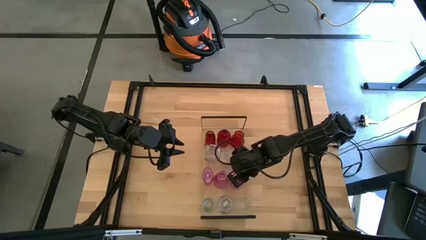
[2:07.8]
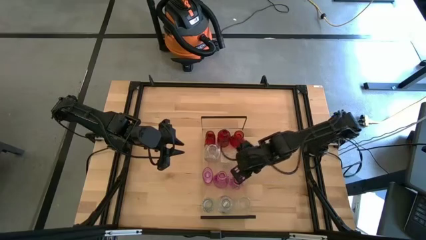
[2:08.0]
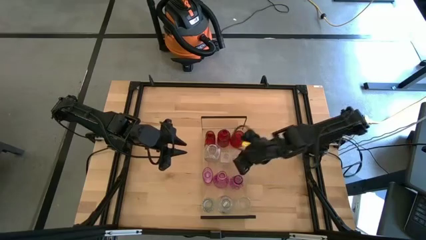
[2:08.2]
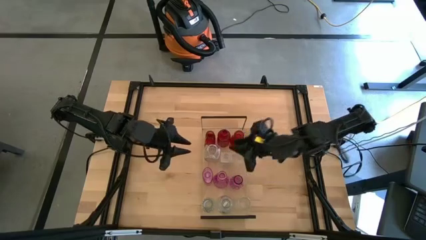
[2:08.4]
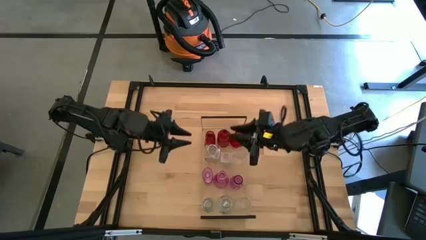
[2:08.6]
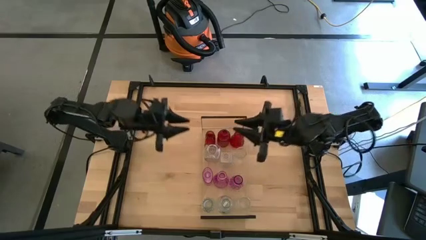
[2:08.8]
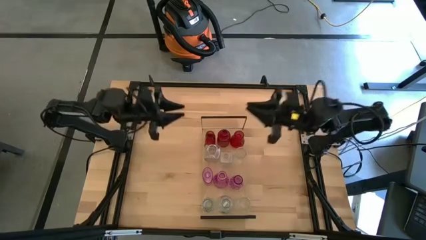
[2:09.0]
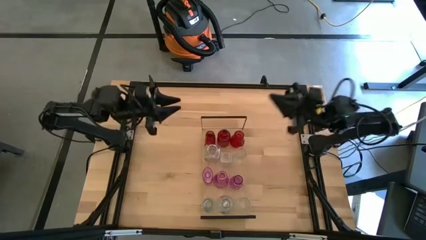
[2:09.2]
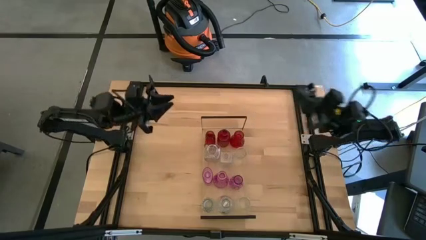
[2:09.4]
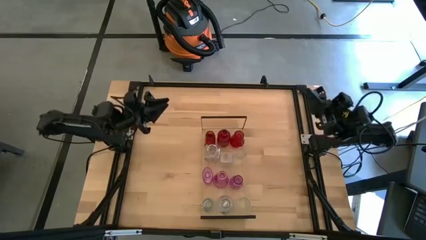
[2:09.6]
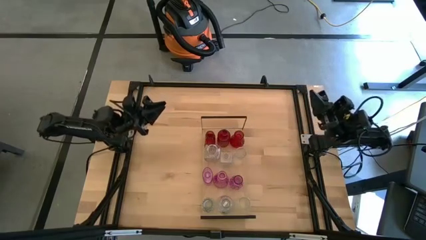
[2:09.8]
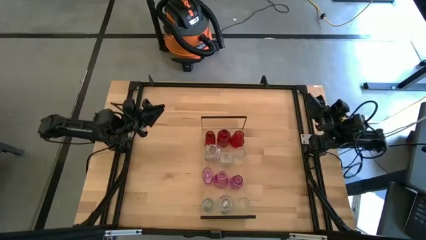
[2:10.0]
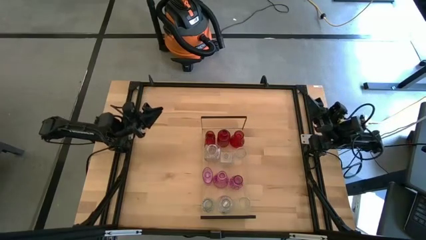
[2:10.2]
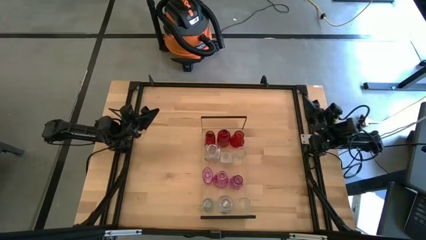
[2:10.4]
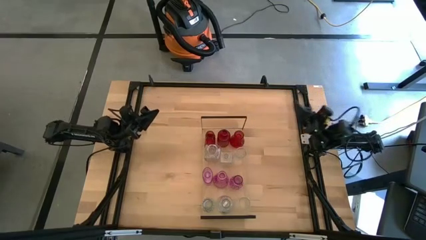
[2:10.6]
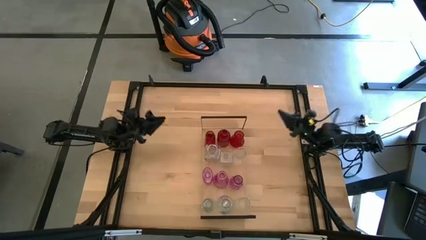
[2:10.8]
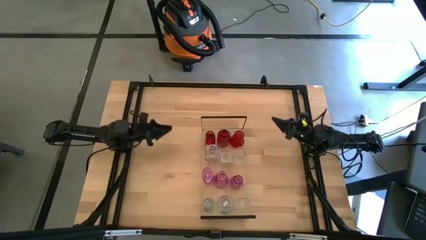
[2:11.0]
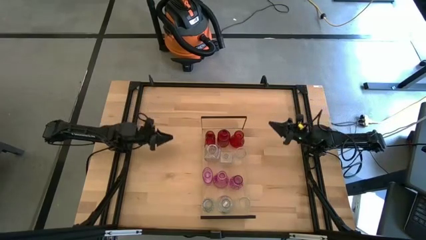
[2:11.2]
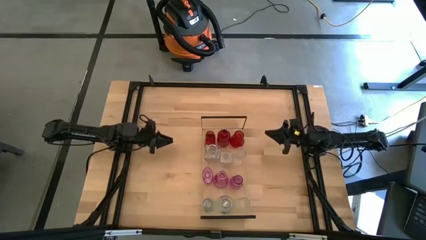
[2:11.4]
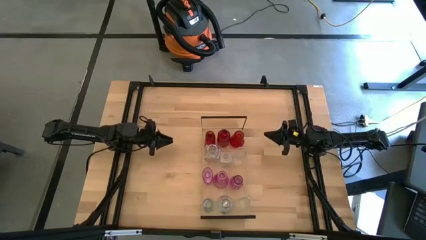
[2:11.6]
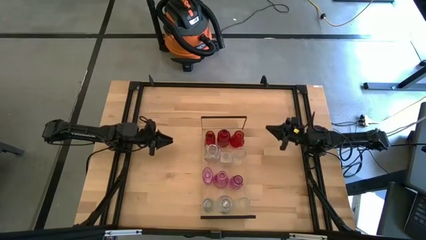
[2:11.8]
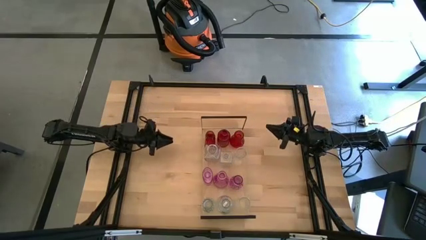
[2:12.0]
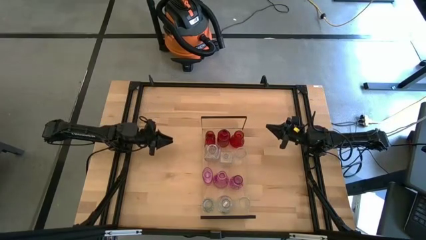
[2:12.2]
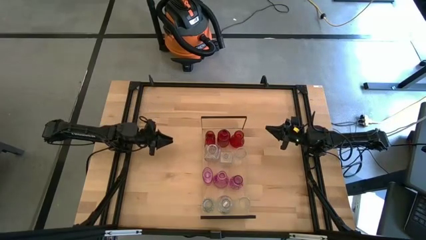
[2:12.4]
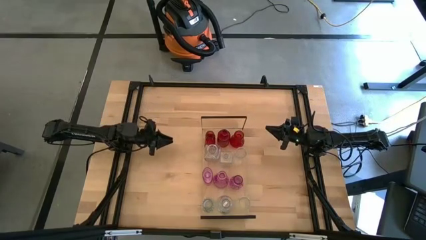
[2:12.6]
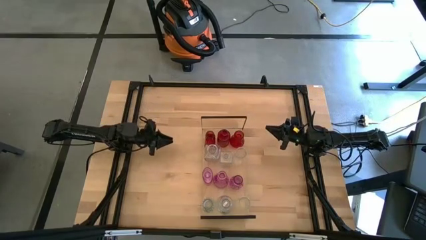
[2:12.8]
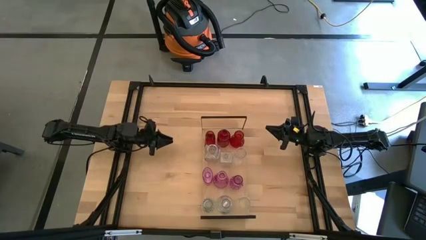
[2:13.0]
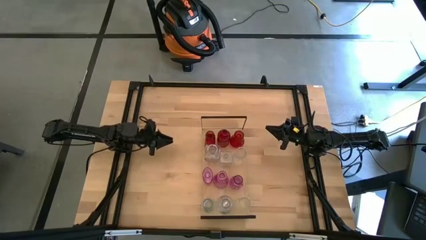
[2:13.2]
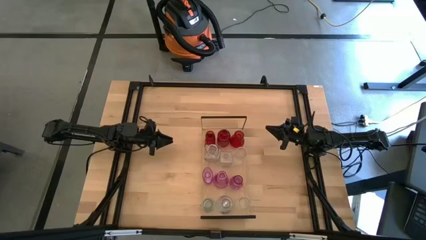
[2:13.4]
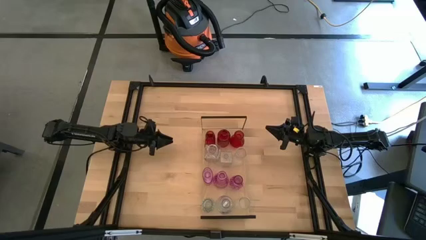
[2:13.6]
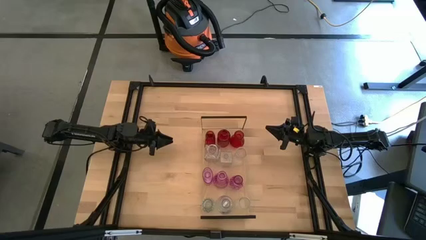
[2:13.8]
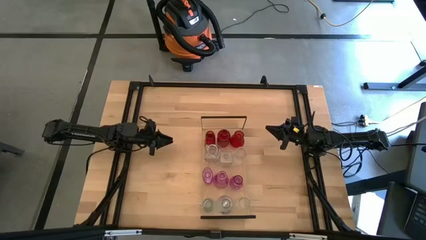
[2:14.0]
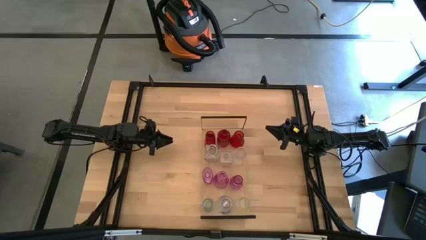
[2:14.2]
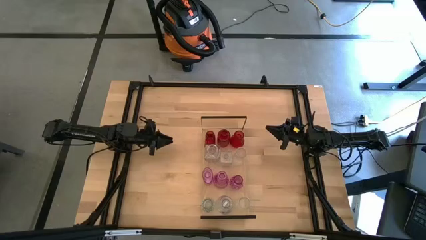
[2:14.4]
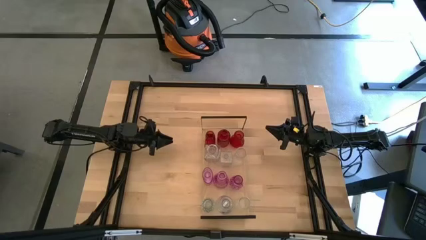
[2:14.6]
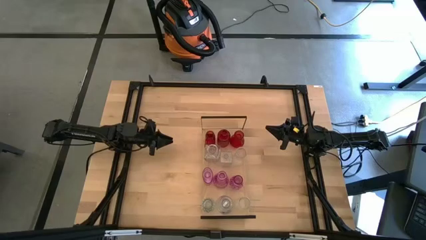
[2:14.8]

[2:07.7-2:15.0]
Task: sort vases onto shelf
Return to Home Position

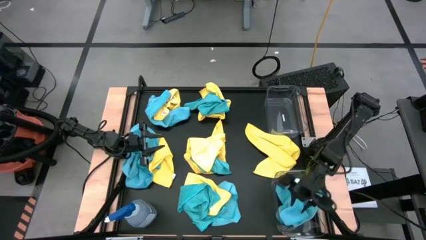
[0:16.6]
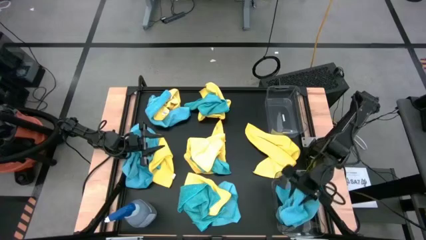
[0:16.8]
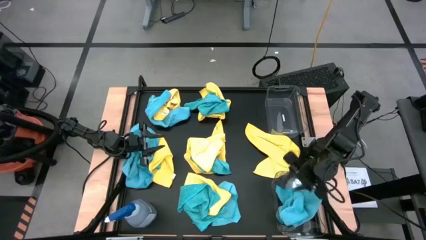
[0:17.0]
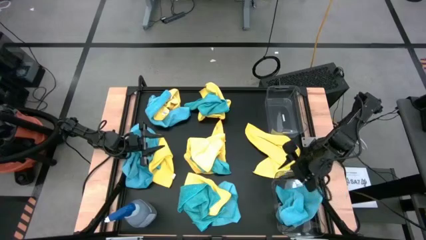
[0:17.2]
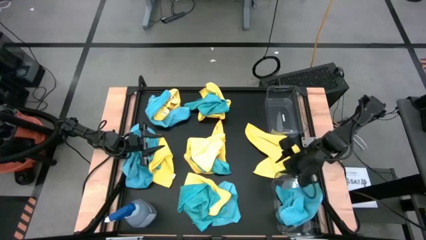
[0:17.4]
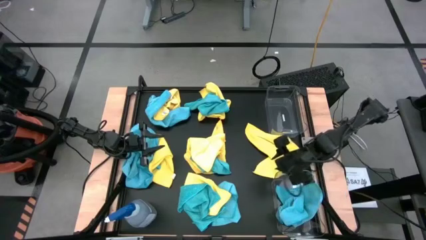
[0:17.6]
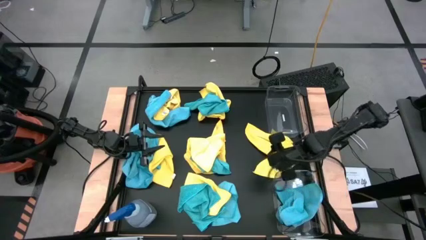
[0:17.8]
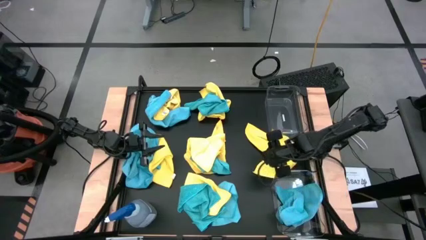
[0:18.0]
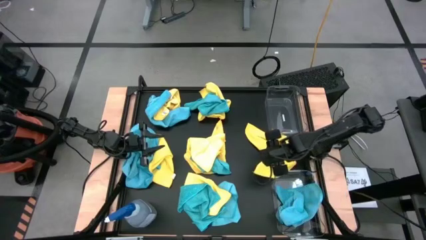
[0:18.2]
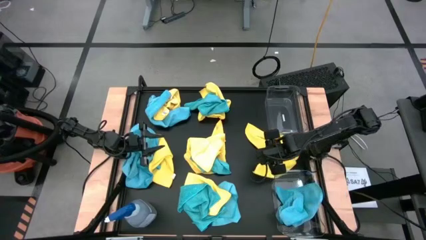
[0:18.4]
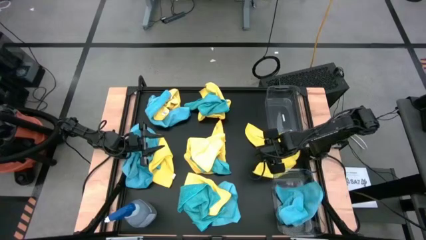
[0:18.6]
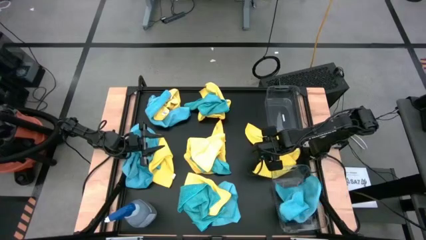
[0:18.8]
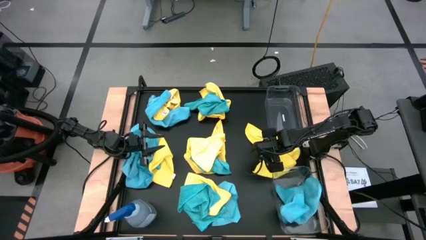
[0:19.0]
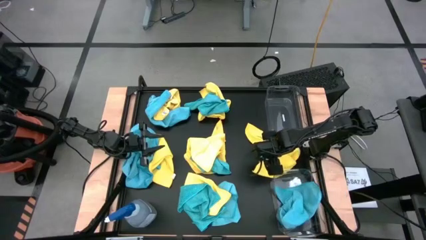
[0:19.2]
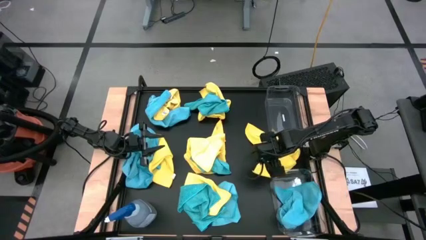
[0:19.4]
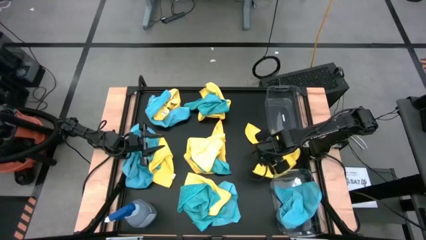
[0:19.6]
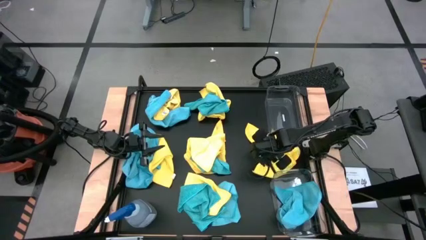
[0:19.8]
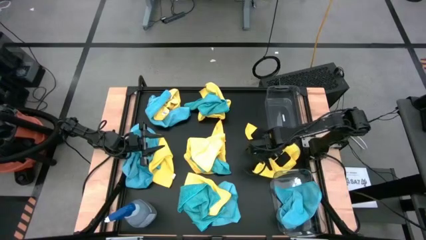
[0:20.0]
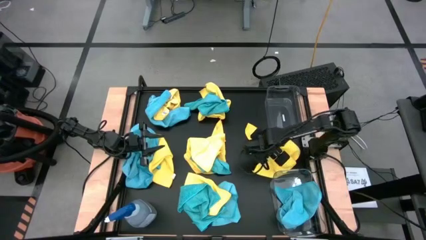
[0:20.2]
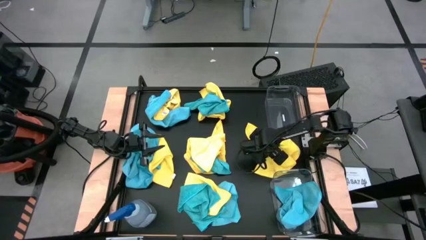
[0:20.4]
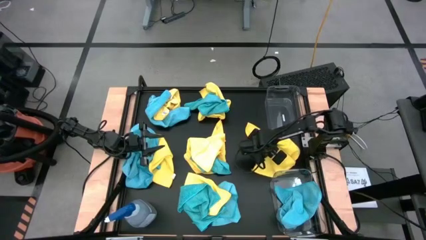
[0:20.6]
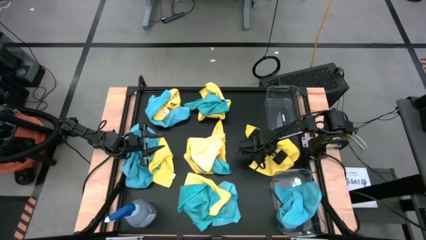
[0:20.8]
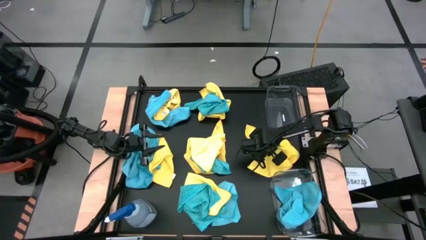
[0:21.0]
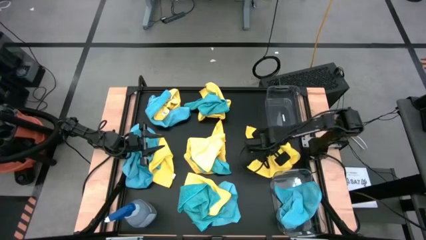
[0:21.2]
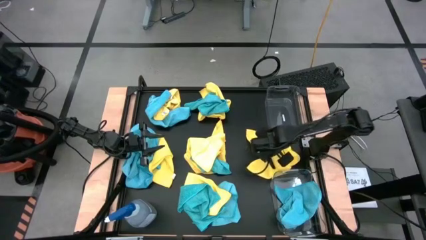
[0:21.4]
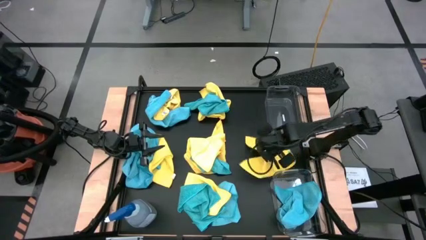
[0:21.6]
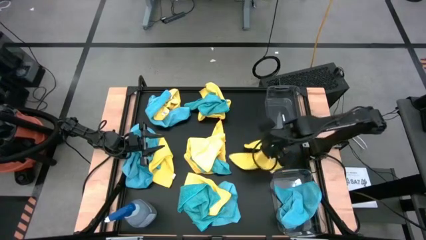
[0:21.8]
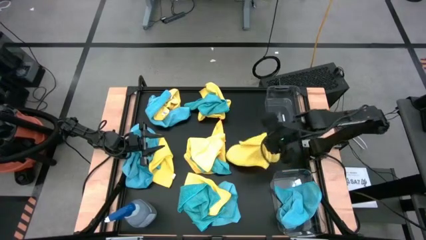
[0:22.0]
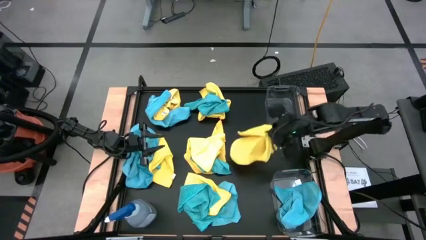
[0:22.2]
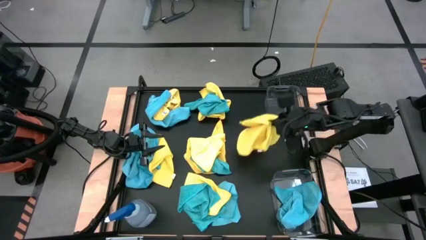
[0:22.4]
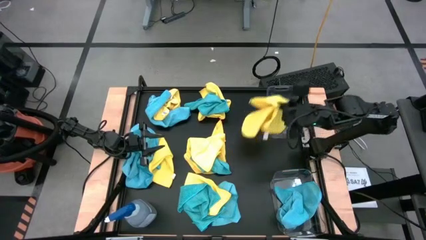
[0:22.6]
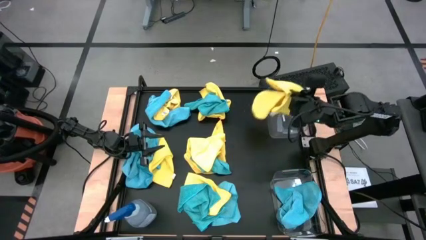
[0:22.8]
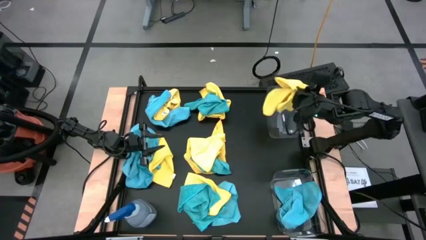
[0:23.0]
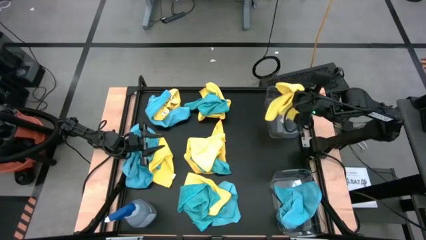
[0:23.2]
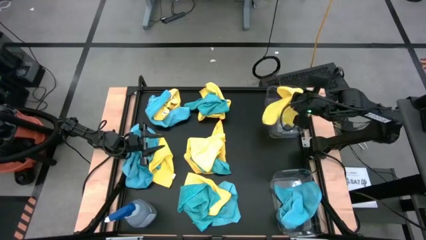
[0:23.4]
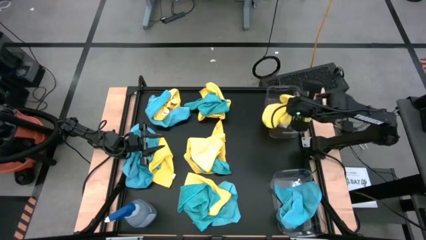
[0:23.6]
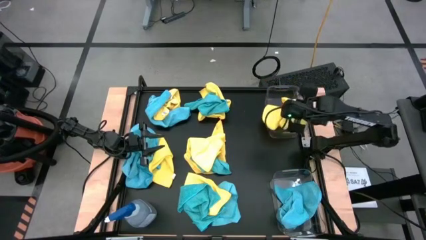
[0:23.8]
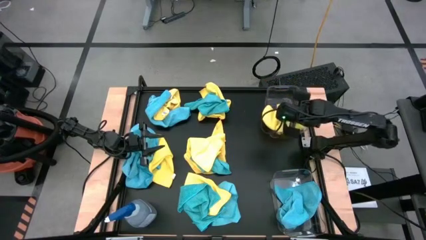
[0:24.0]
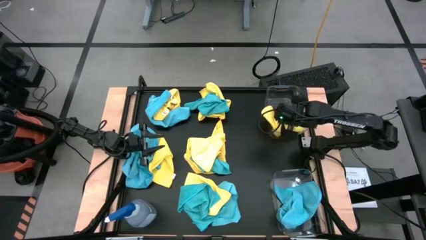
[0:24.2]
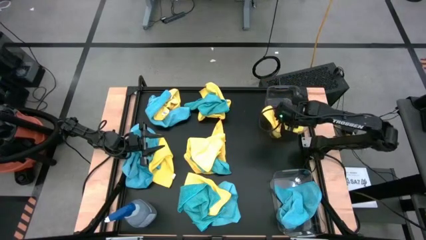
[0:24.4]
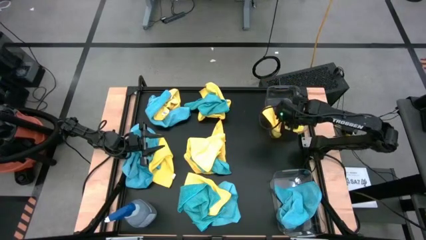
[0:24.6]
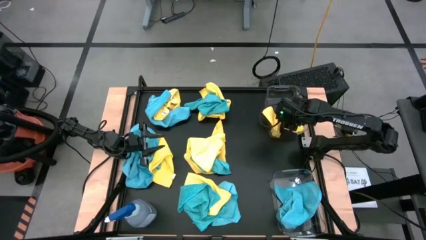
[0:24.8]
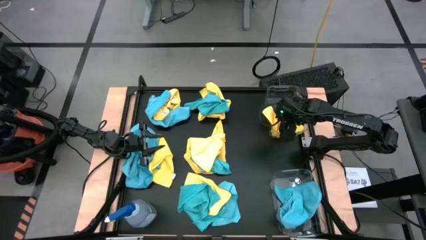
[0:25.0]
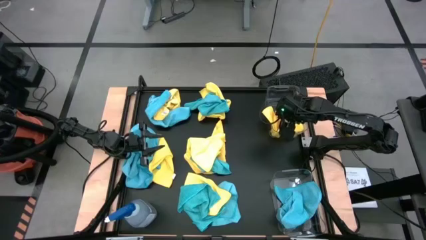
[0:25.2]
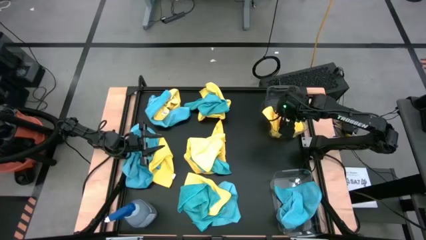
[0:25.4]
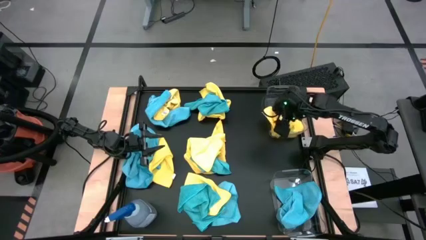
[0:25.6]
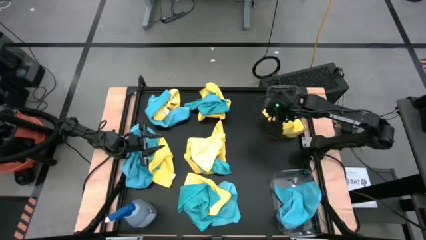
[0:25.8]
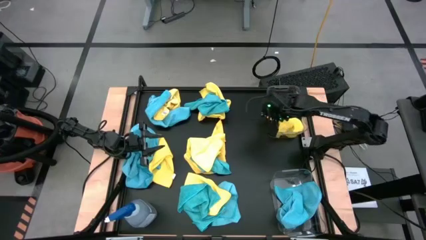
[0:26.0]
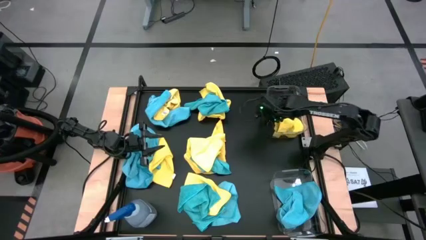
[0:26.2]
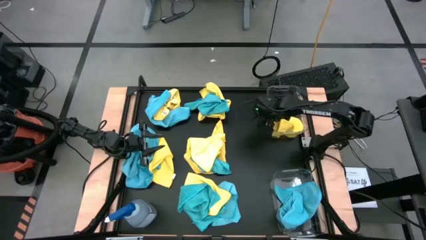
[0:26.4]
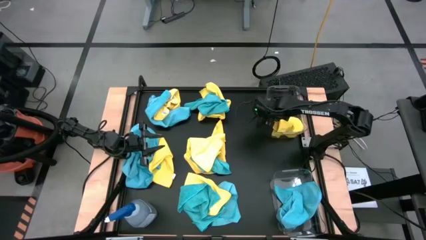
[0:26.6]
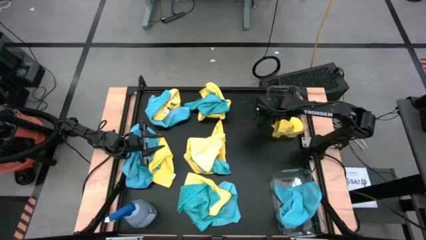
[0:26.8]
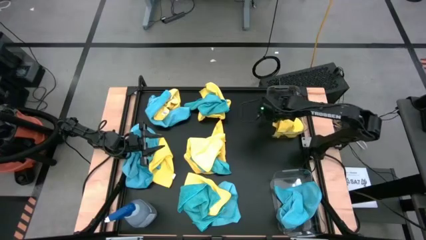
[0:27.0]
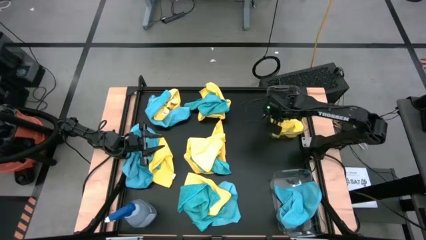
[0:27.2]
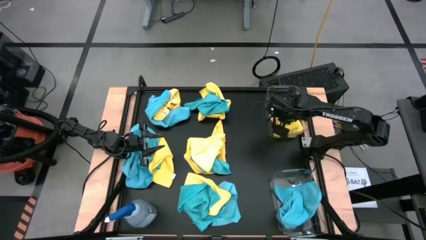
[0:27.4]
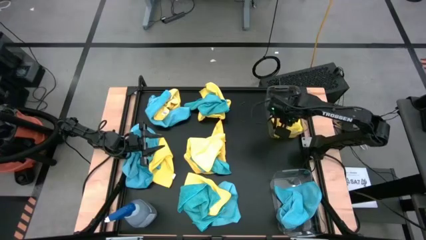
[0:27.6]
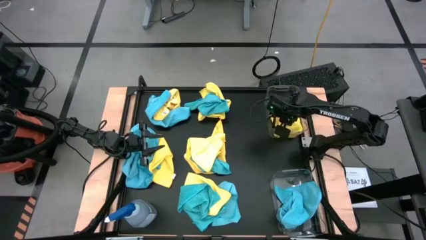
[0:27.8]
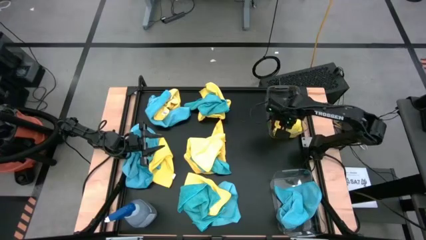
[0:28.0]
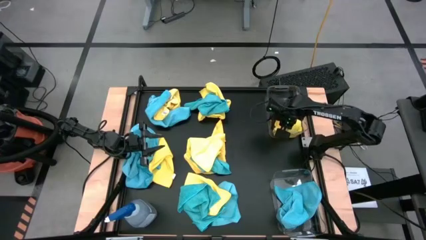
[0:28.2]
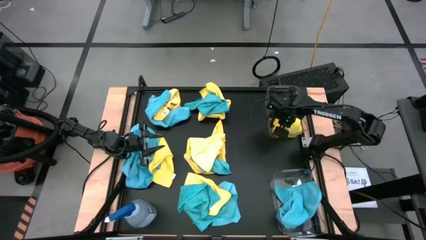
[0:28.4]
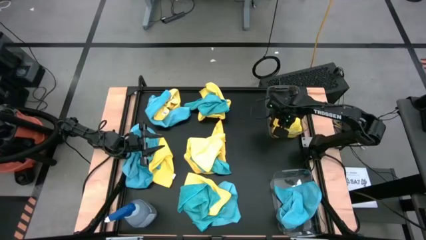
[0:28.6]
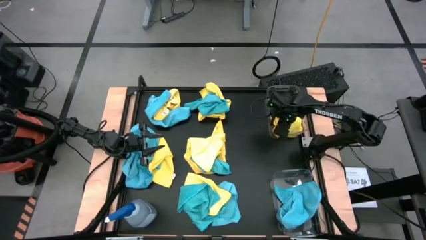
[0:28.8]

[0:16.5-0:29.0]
Task: Sort microfiber towel by color & place in baskets
Put the yellow towel into the top transparent bin
